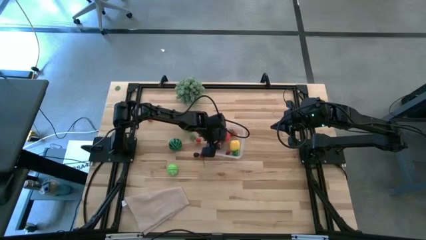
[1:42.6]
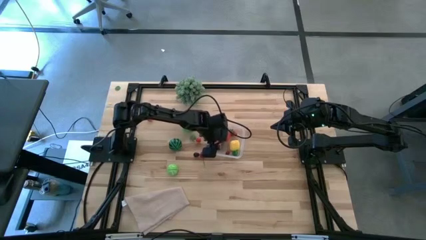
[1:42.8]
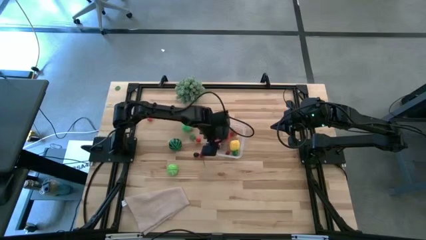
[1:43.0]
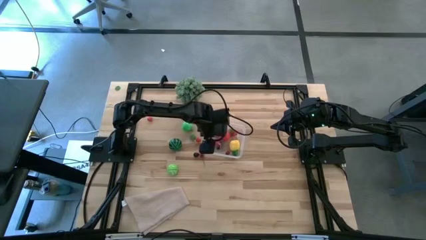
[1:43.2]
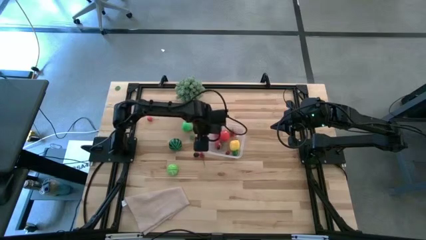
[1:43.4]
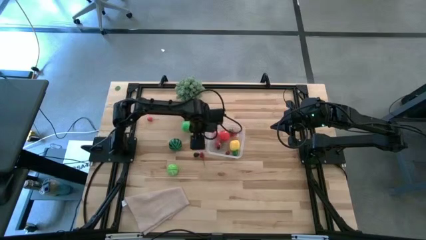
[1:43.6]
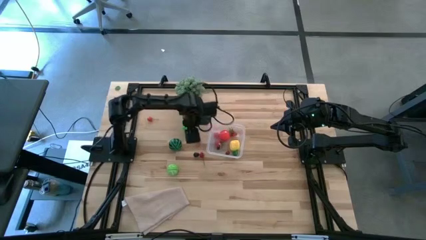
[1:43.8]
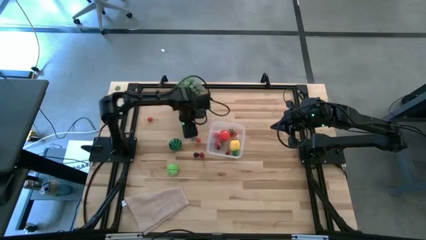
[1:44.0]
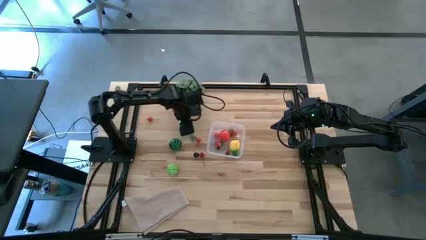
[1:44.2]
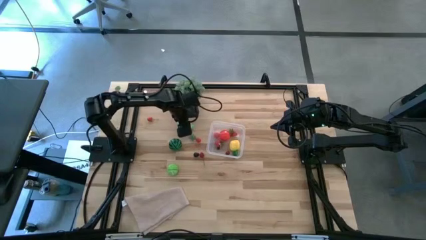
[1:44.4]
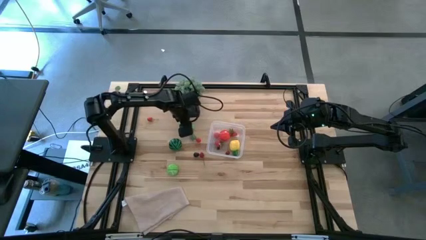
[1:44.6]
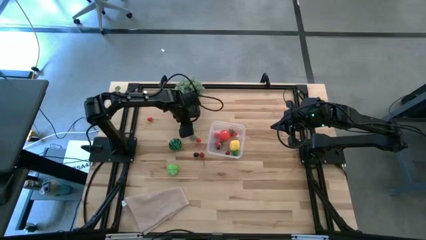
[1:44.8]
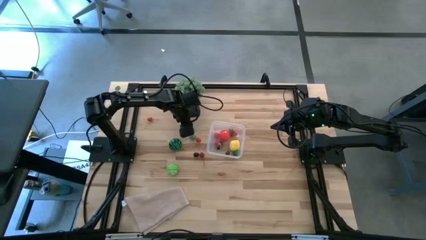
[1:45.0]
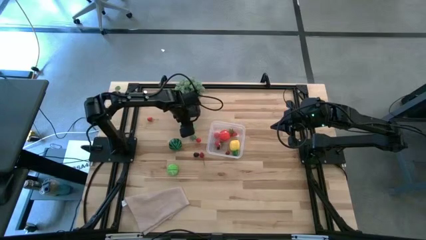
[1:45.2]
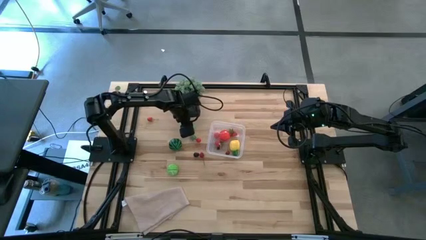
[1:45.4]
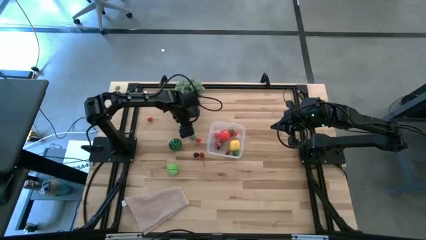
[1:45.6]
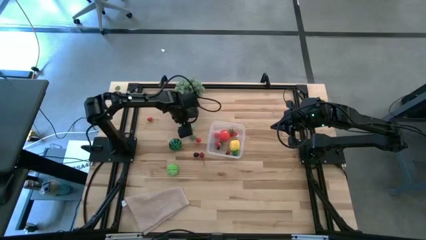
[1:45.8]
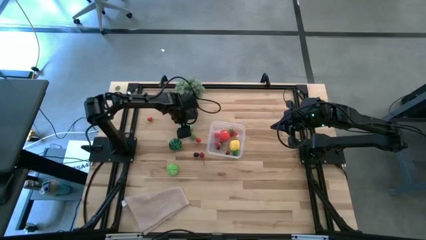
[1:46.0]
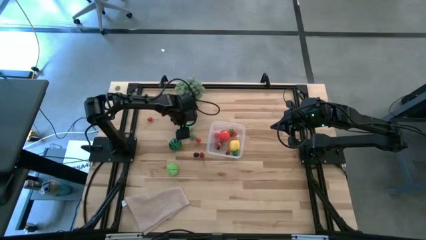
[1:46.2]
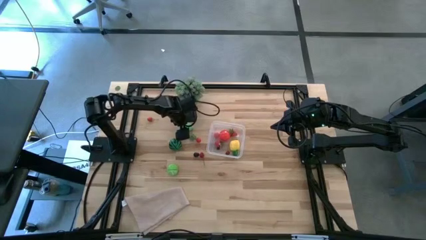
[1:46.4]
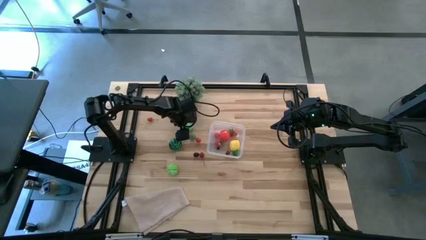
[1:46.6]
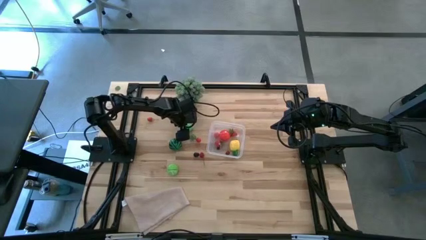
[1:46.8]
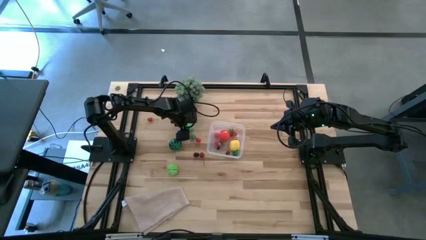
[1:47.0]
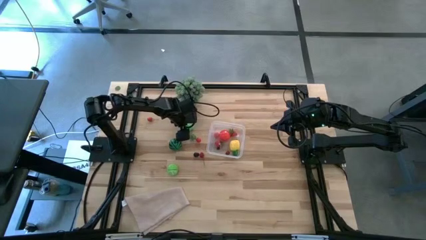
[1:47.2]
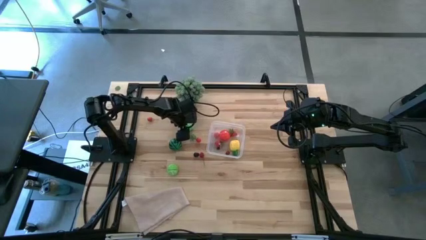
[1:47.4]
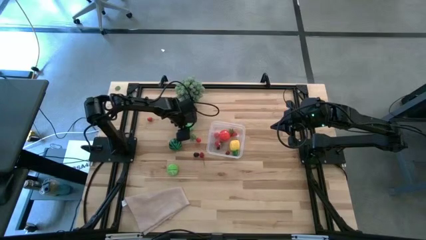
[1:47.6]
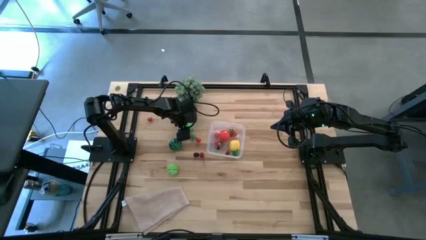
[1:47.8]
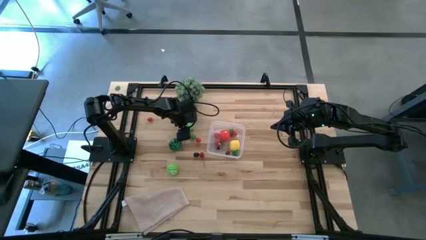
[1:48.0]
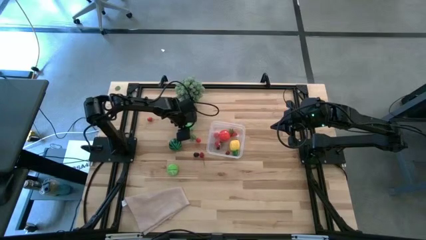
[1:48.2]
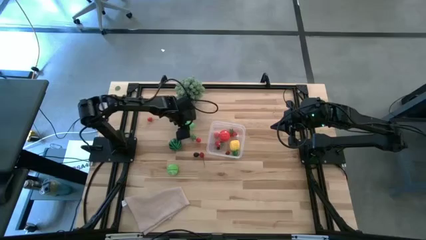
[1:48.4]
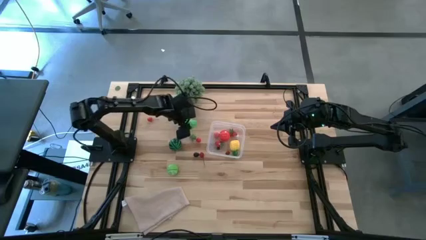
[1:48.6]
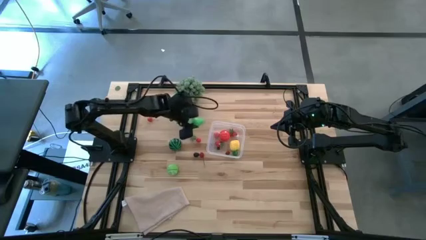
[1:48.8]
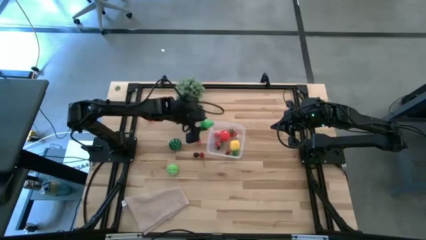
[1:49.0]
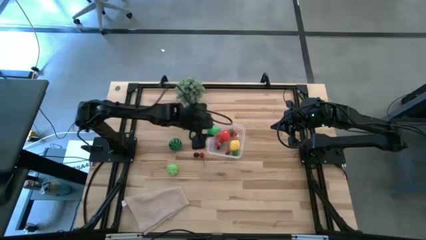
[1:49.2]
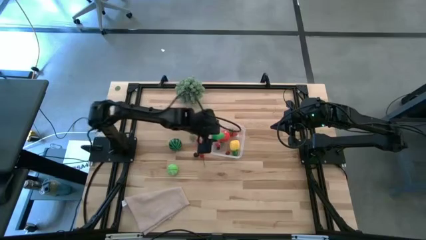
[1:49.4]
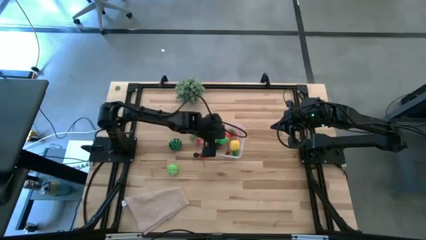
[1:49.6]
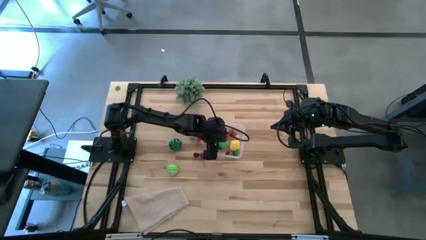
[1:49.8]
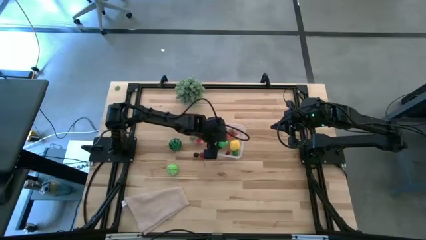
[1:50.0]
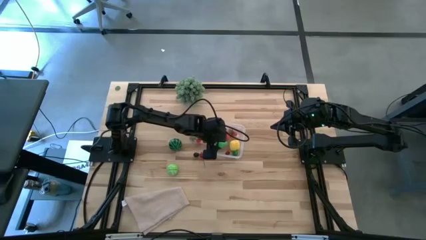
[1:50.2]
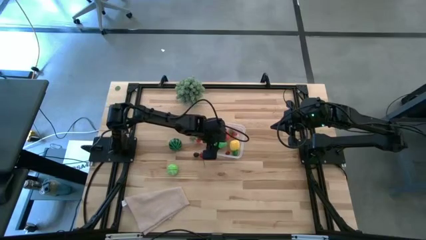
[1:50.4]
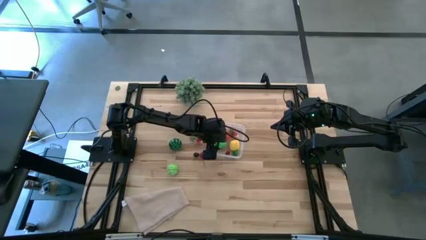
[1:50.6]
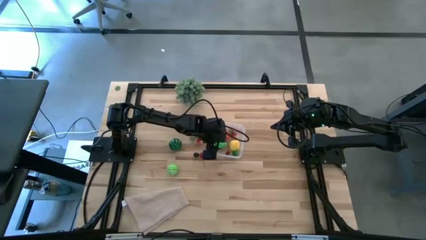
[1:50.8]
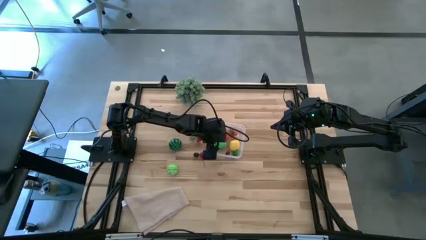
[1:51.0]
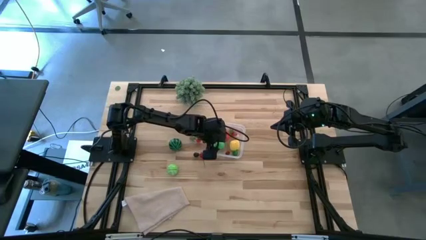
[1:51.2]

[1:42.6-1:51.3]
Task: Pick and placing Produce into tupperware
Put the green pear into the transparent bin

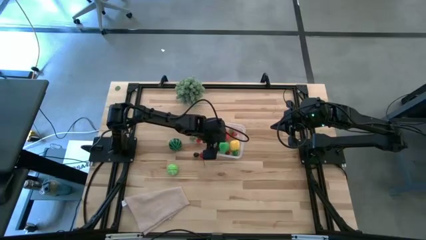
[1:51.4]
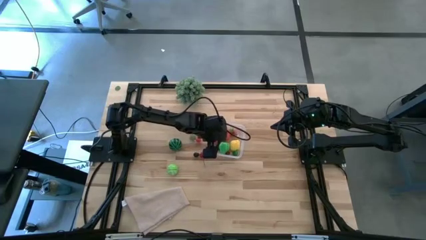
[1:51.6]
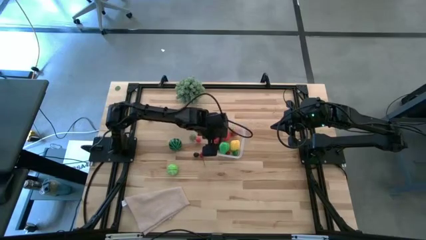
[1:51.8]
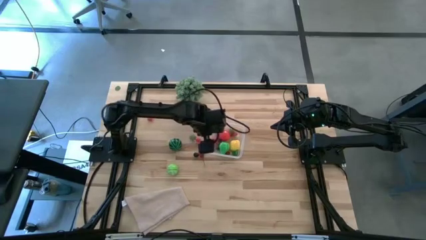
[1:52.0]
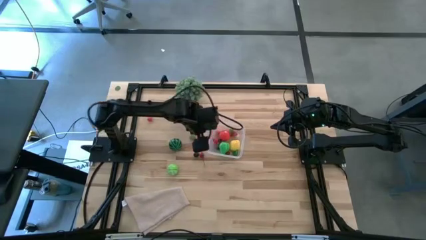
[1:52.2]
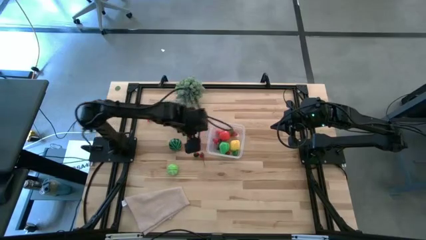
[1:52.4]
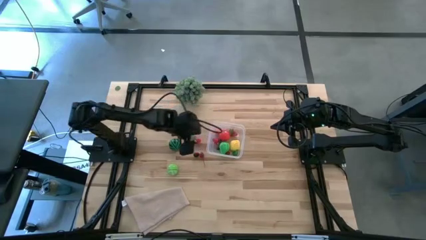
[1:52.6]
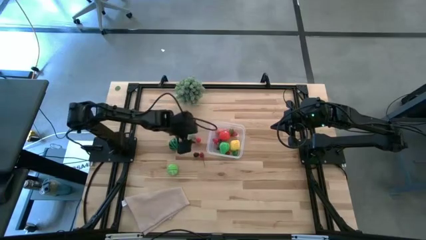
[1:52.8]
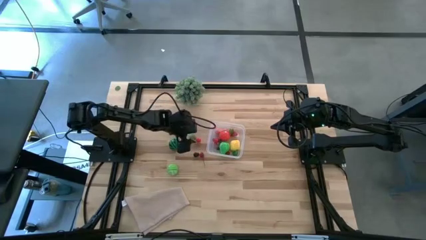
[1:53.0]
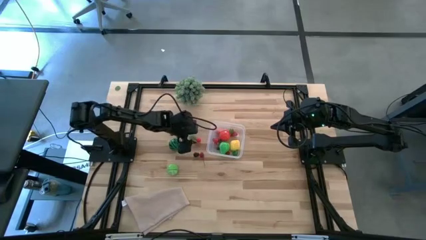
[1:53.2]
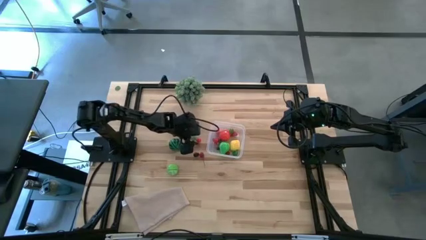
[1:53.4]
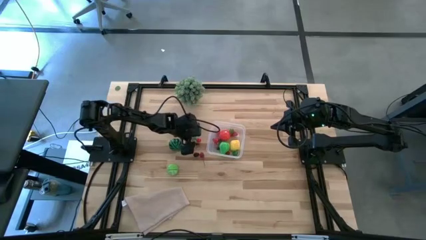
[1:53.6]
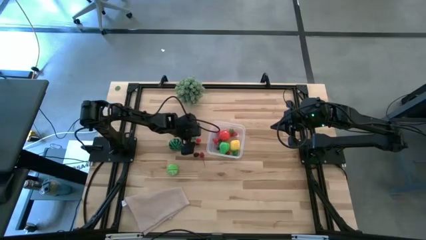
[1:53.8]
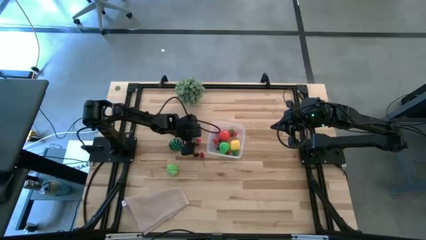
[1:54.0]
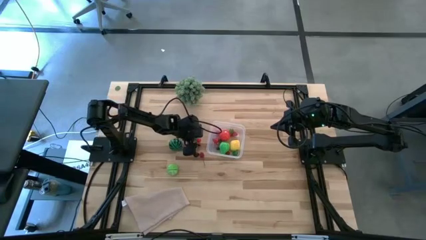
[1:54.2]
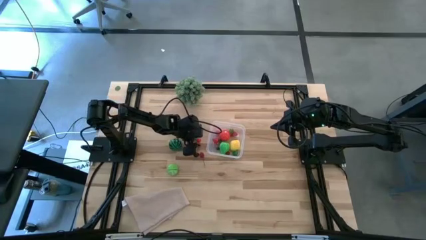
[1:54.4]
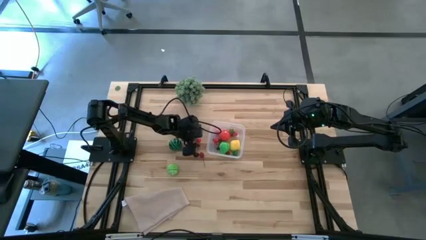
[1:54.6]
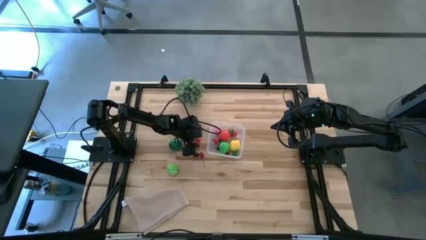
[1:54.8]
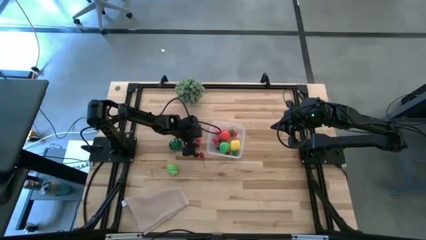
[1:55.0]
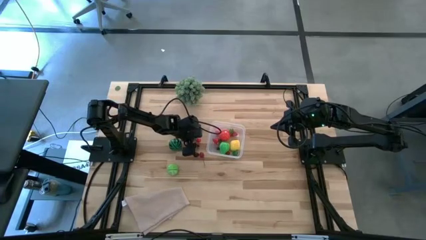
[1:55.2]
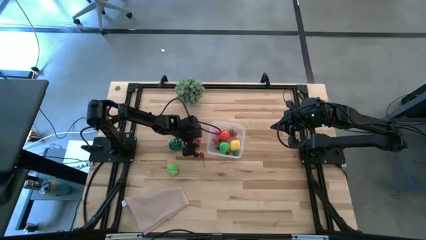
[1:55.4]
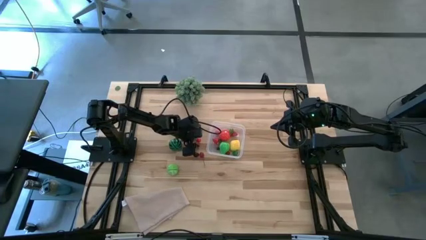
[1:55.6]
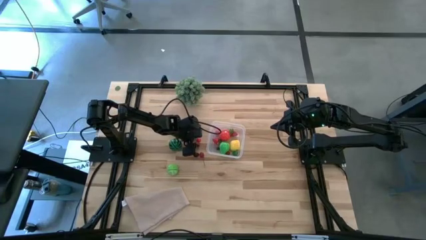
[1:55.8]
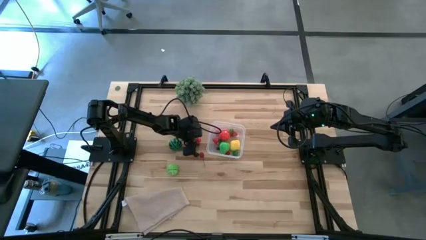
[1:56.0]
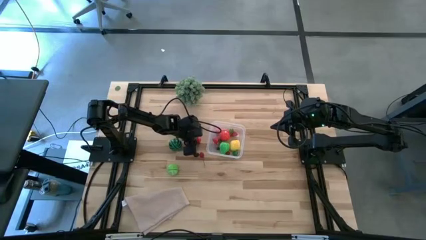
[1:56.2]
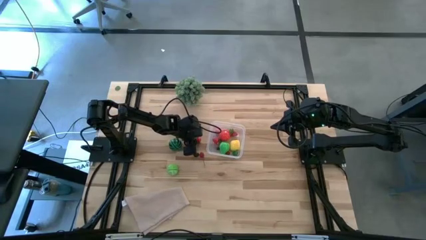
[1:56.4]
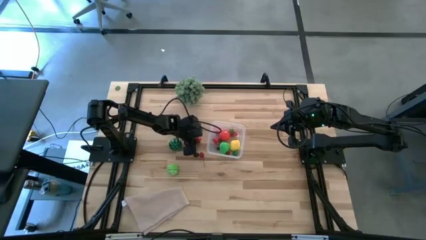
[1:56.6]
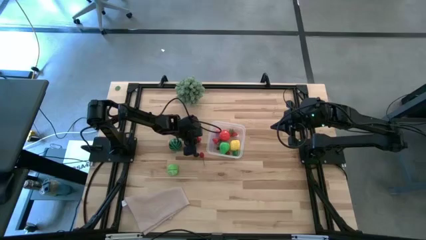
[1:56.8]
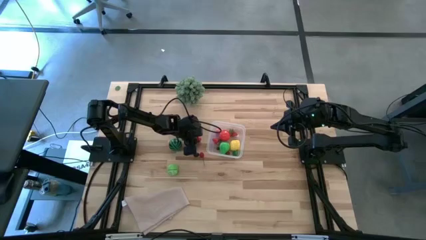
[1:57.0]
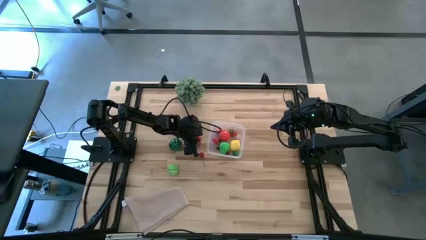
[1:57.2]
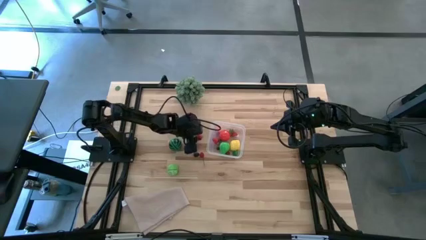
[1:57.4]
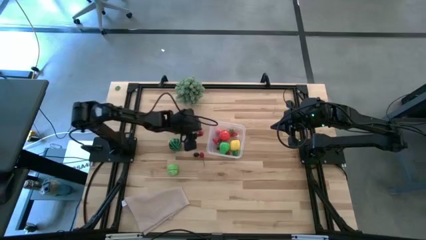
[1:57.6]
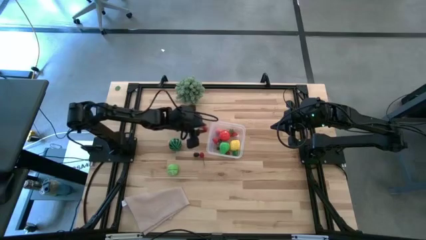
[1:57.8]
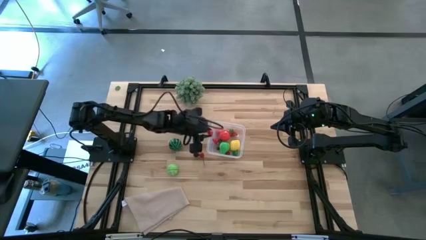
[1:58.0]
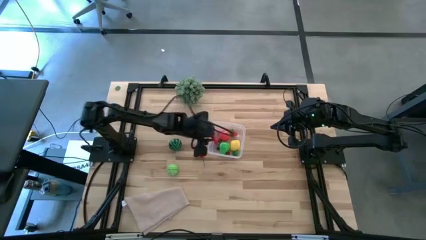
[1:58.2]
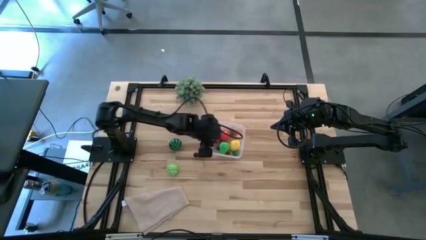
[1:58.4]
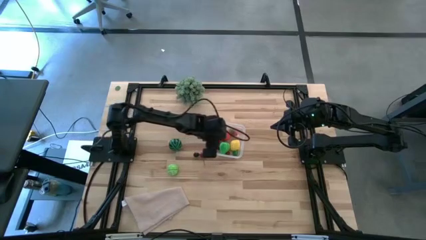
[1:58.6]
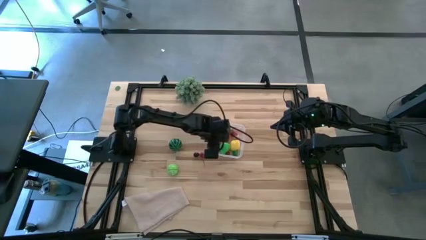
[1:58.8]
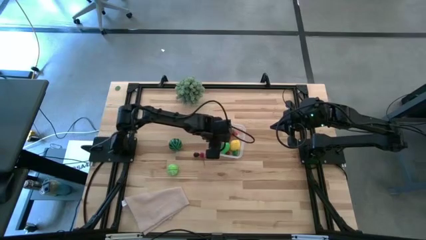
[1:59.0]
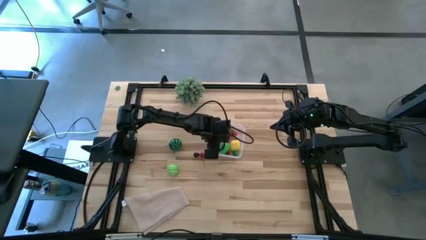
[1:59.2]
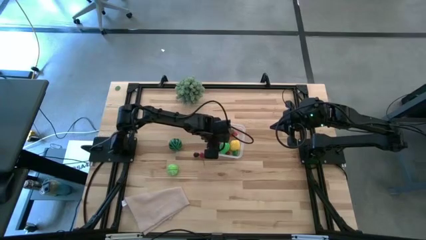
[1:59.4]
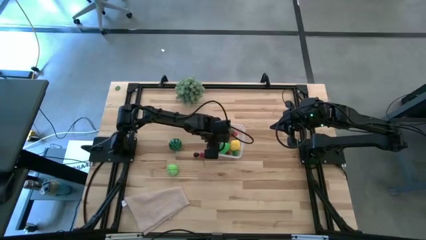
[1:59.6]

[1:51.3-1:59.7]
Put the red cherry tomato into the transparent bin
